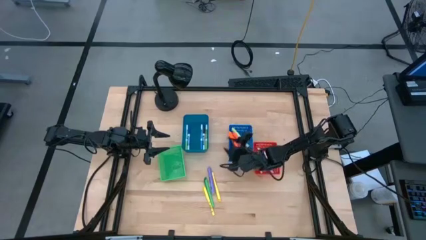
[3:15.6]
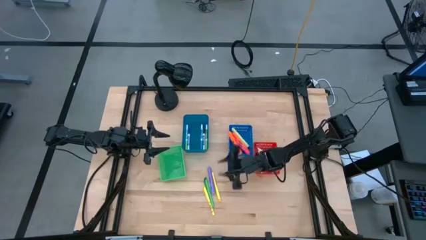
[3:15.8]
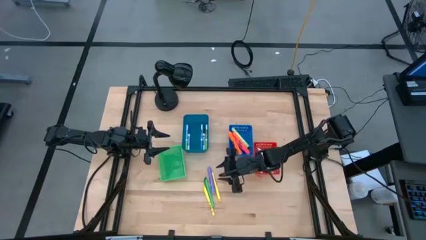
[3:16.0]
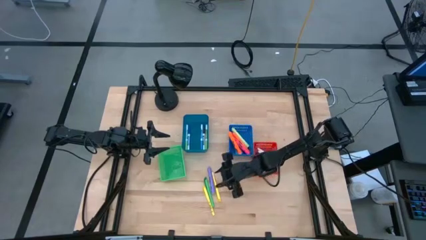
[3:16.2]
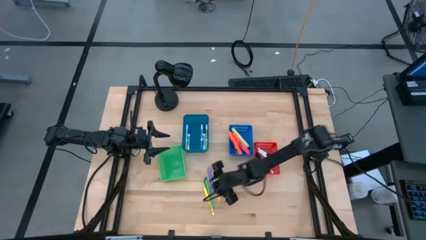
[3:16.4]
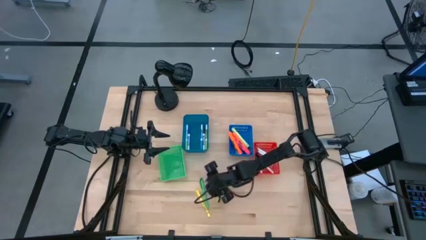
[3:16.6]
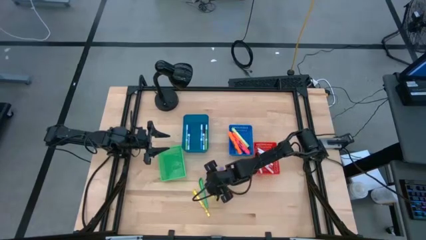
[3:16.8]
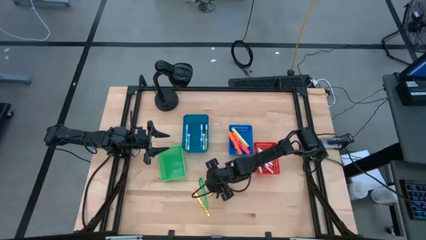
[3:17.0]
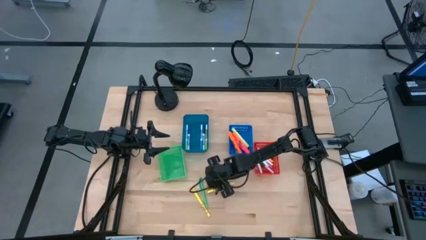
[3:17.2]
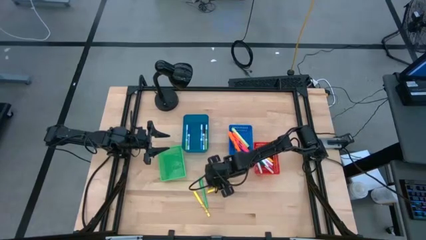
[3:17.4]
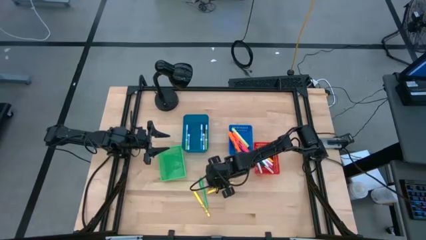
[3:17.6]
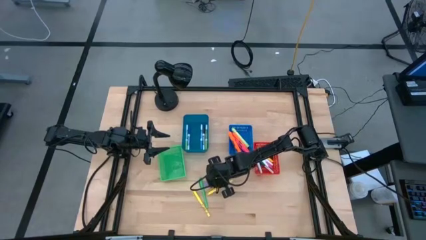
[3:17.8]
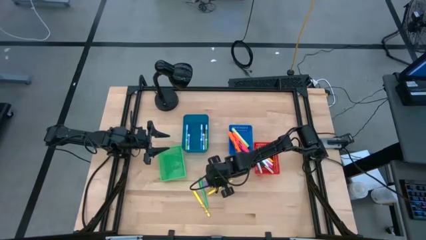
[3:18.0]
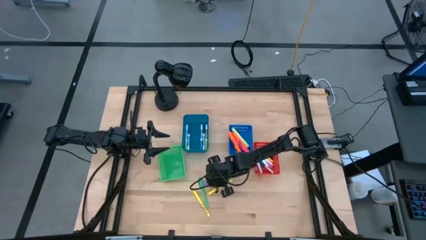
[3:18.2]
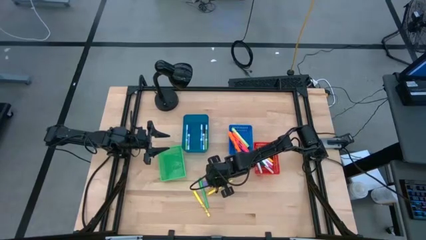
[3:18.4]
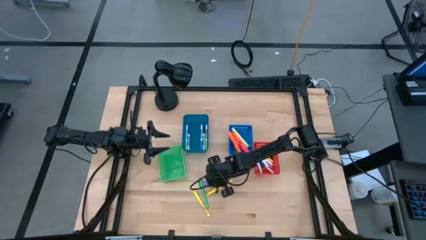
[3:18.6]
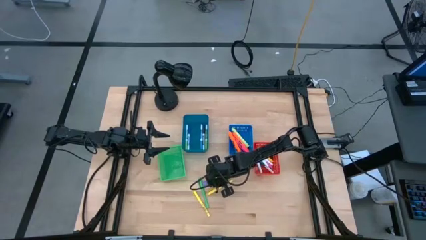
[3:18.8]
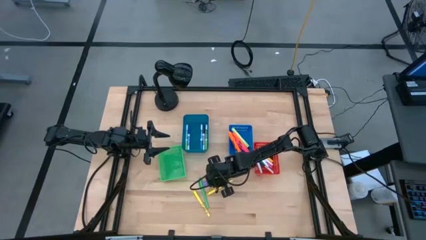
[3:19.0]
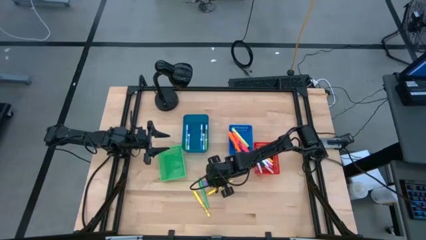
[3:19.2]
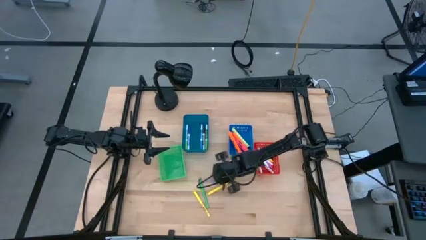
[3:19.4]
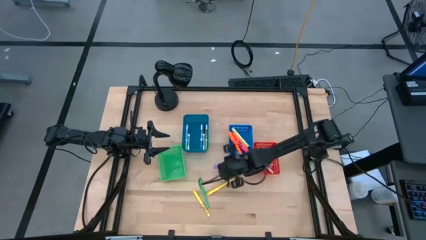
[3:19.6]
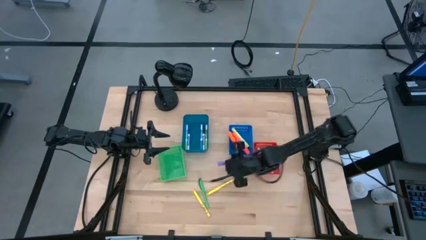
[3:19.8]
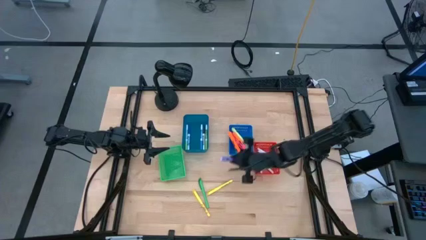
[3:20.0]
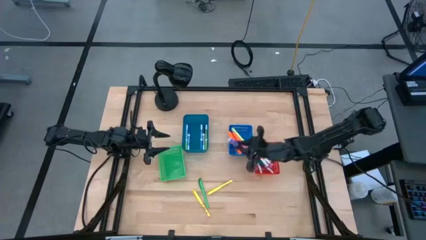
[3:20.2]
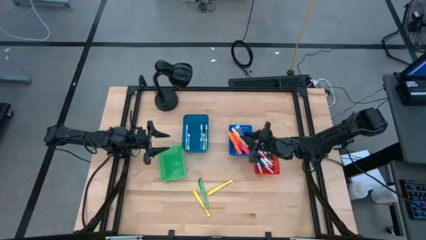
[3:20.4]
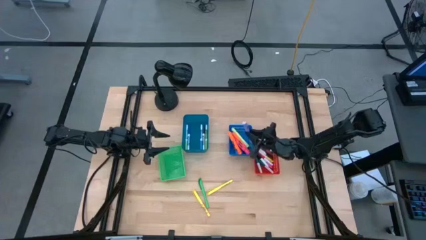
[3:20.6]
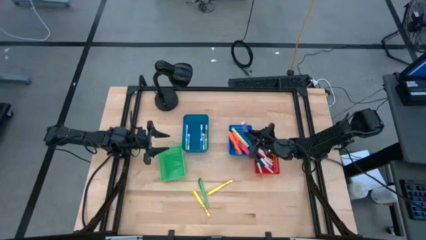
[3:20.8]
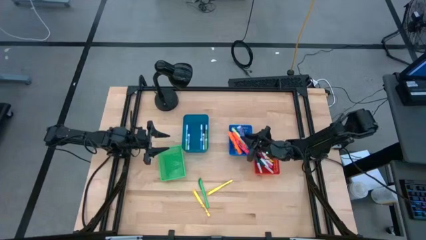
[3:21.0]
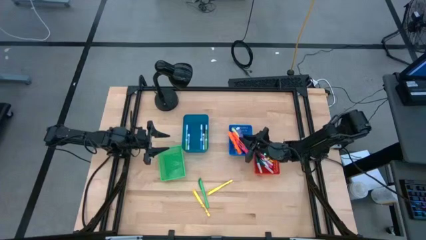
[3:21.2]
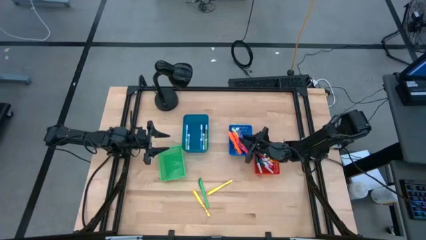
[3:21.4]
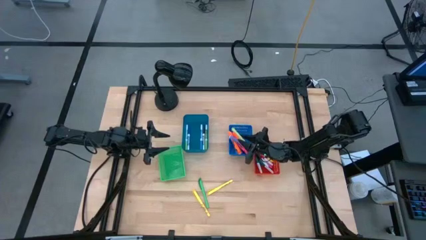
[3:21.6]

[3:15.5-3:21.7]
Task: Pick & Place Markers
Put the violet highlighter pen into the blue bin

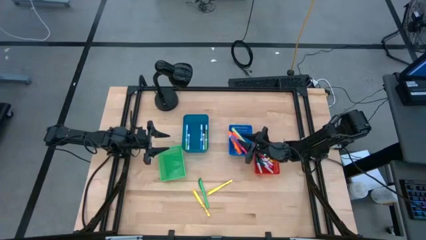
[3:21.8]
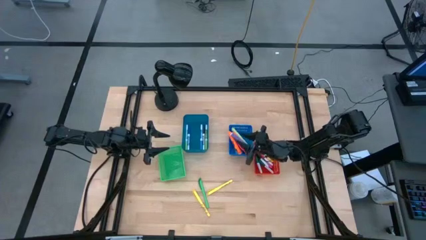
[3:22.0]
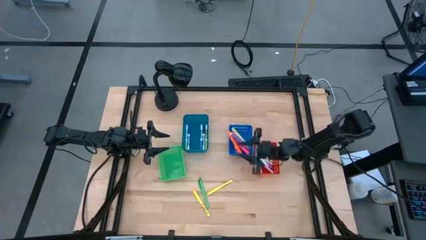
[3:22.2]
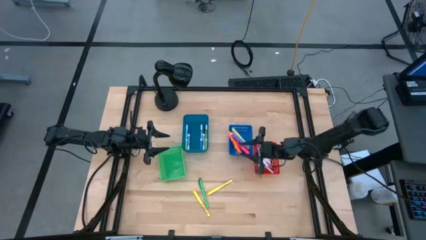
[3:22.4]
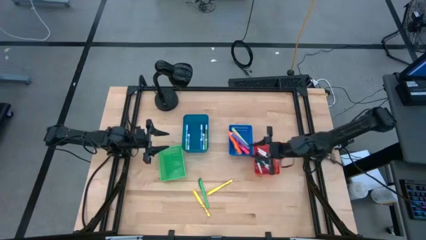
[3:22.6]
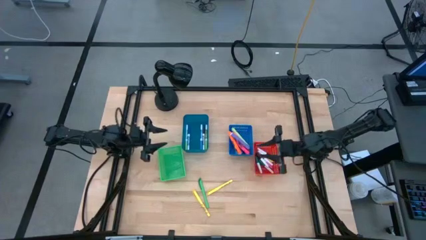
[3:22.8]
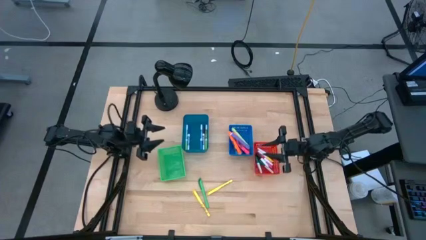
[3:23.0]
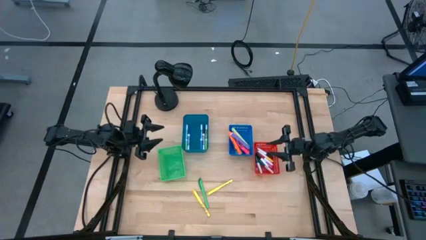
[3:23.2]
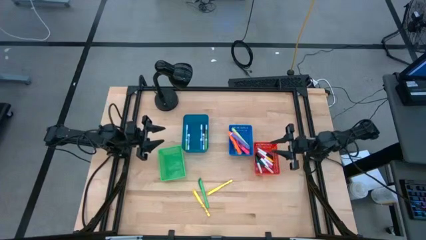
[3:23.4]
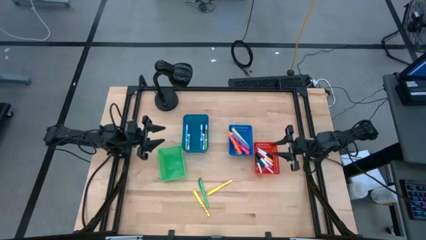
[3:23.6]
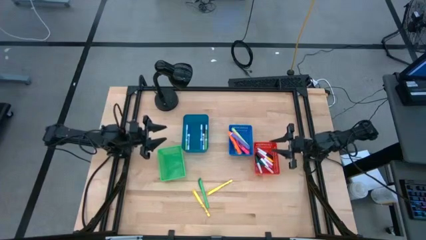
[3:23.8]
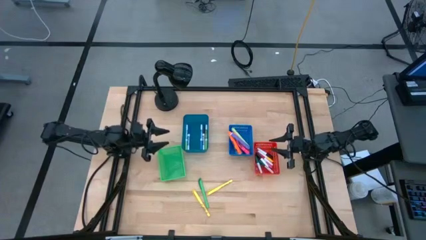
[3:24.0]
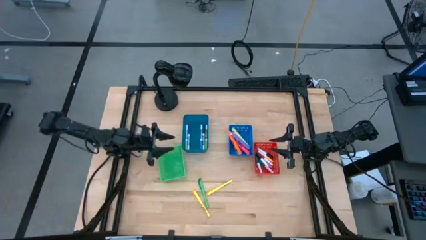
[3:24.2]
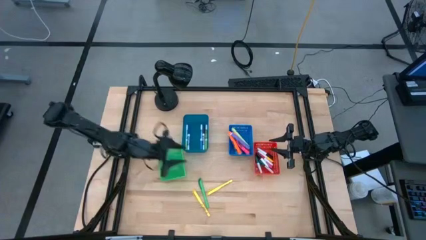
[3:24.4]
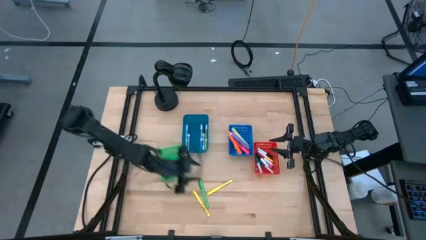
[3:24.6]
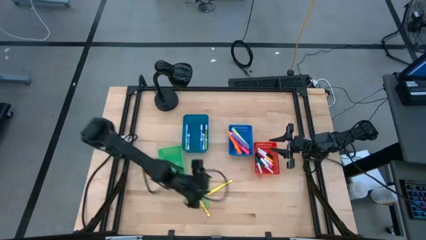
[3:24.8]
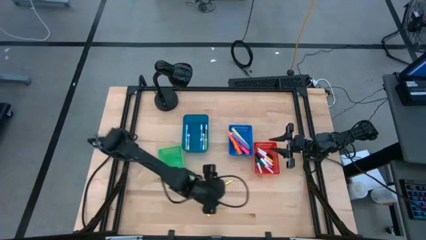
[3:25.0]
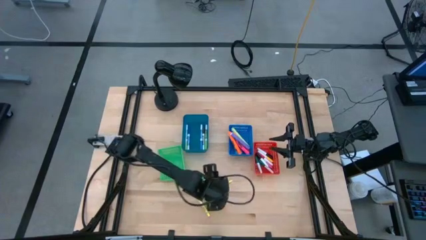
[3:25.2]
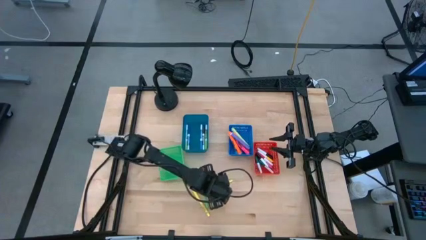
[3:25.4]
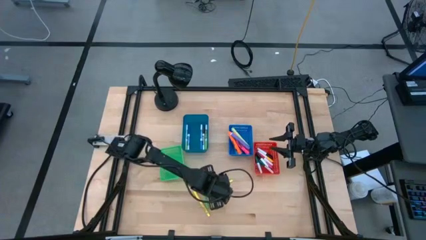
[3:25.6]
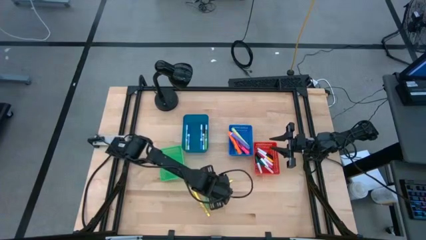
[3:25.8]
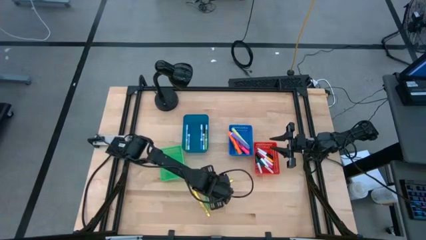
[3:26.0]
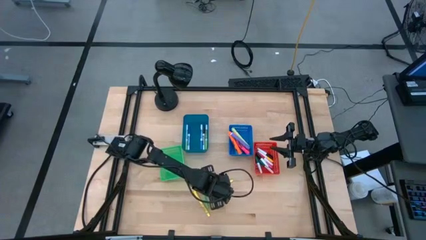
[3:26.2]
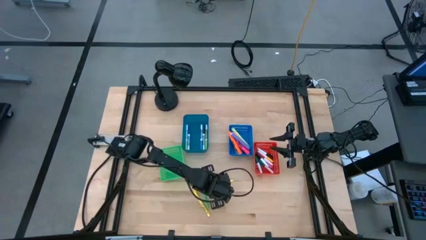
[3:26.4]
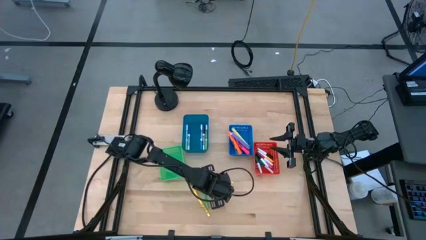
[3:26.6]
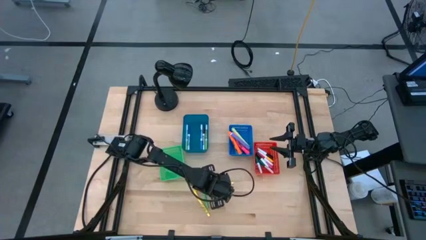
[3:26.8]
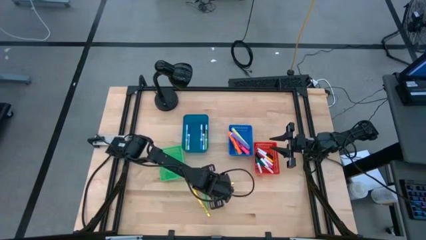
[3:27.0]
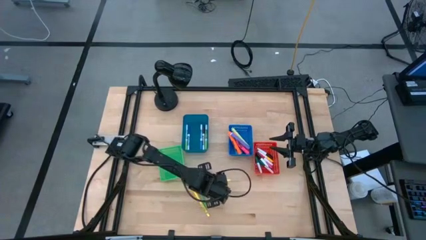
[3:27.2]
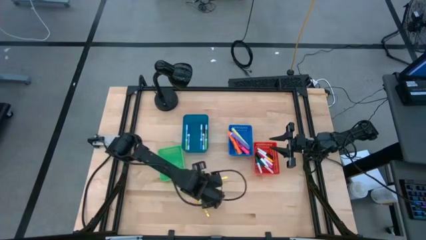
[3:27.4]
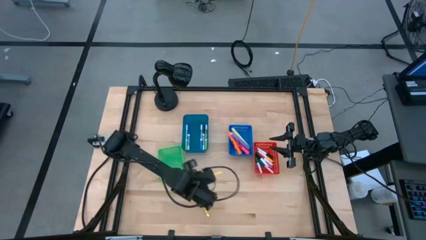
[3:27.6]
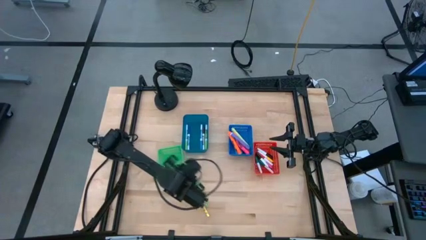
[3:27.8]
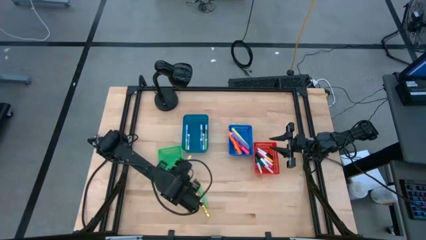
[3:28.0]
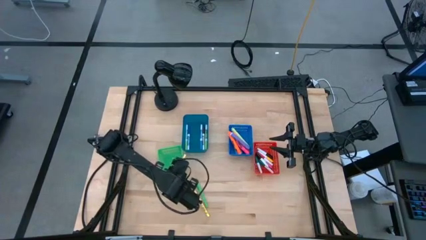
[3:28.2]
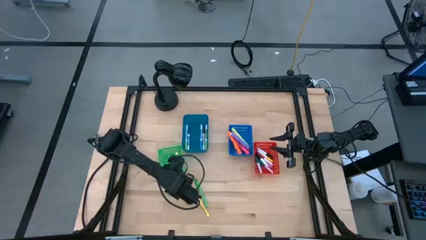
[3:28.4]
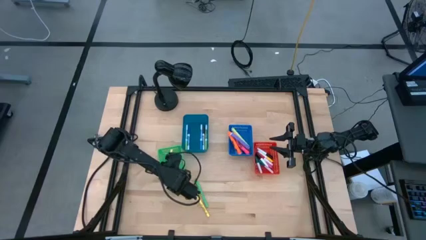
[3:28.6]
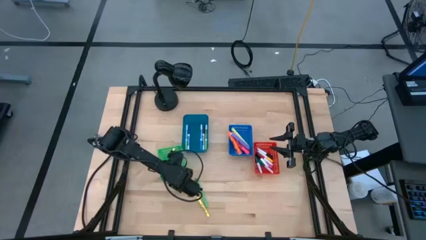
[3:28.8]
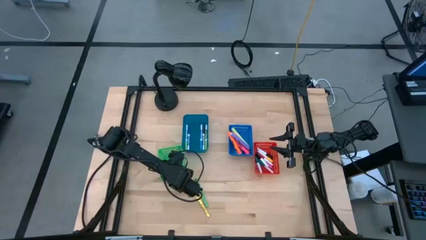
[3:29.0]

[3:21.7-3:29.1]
Put the right yellow pen into the green bin

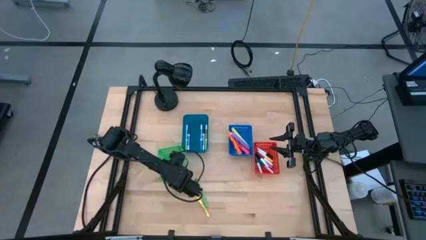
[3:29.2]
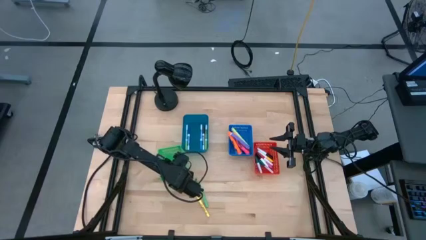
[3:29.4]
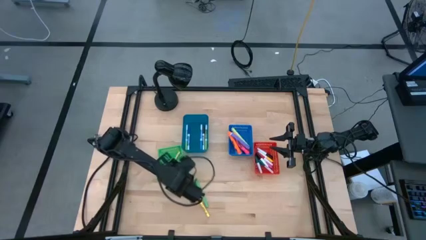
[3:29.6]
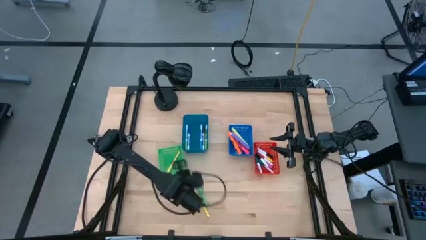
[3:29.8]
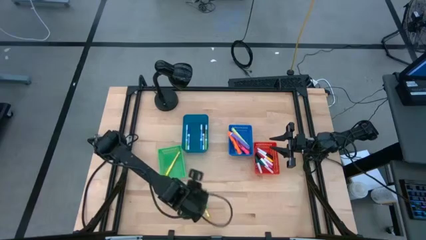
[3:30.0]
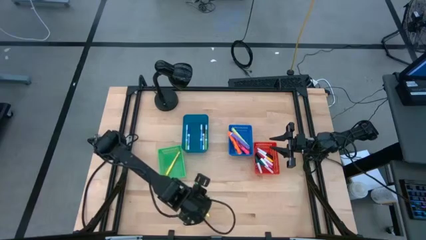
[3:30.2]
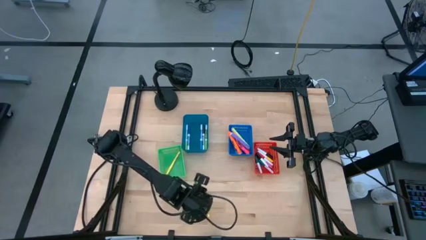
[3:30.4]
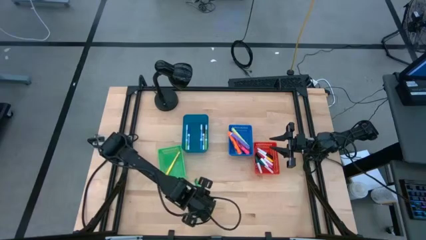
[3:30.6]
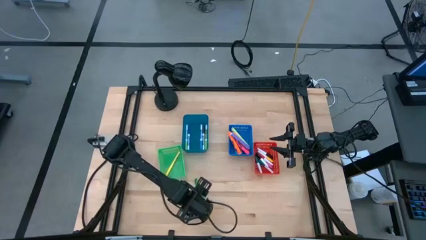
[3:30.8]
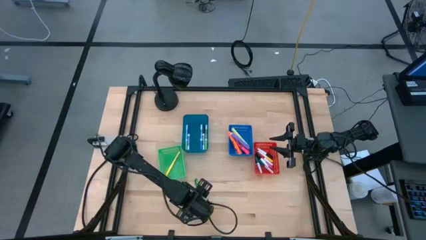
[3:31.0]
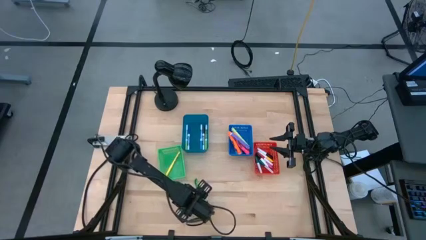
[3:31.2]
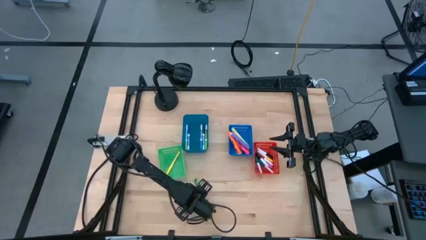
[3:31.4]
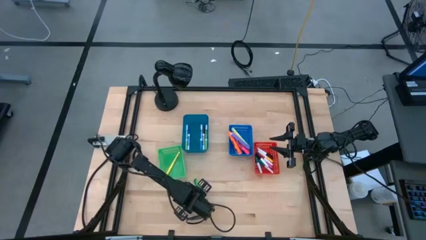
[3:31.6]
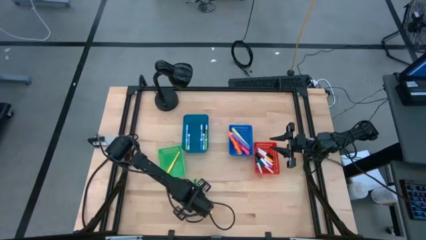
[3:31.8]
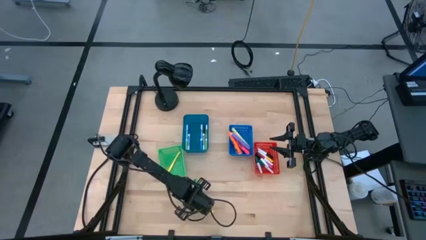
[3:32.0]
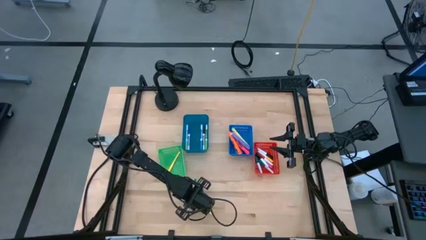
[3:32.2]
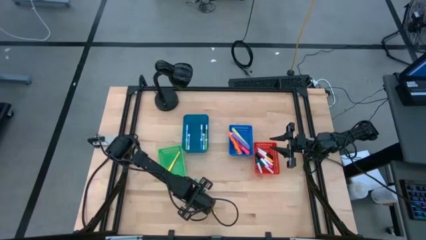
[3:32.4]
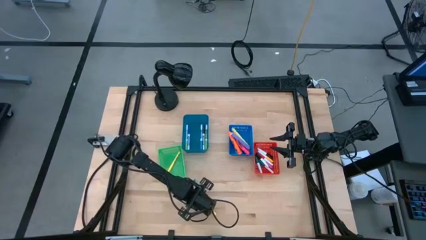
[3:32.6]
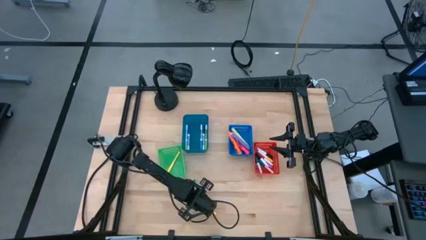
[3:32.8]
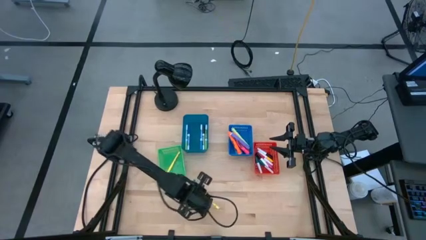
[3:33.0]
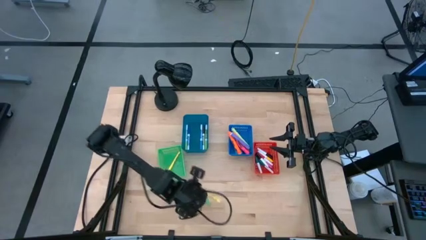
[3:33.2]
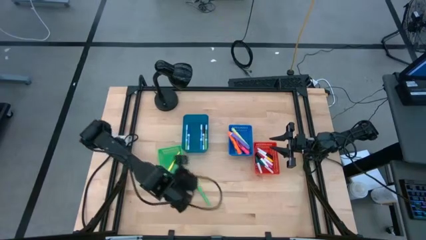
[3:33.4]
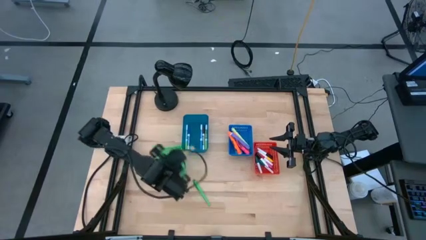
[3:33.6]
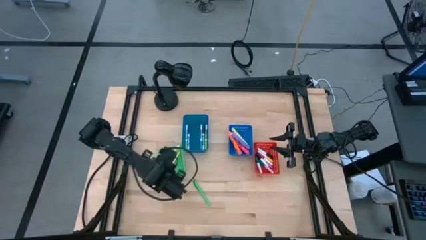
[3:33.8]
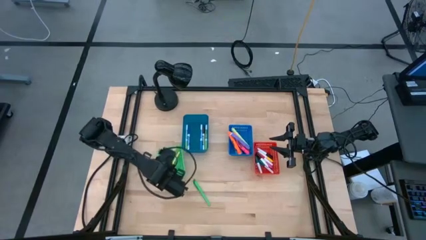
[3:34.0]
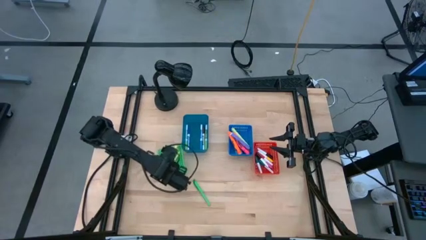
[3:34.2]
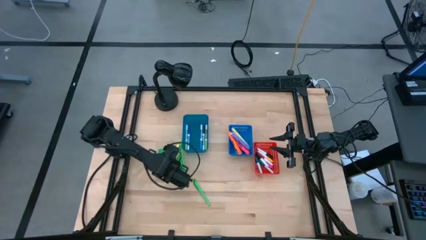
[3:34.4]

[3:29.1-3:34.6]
Put the yellow pen into the green bin
